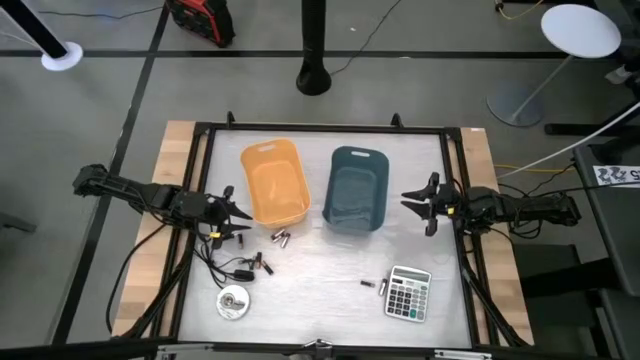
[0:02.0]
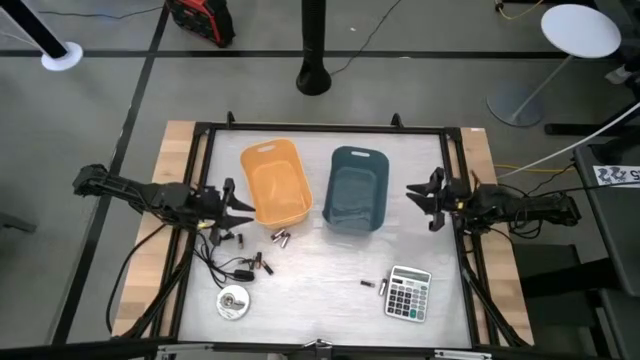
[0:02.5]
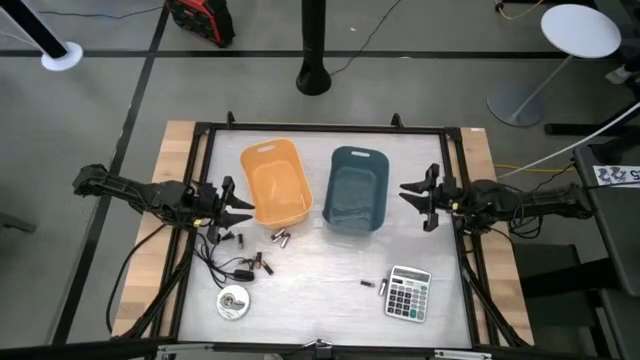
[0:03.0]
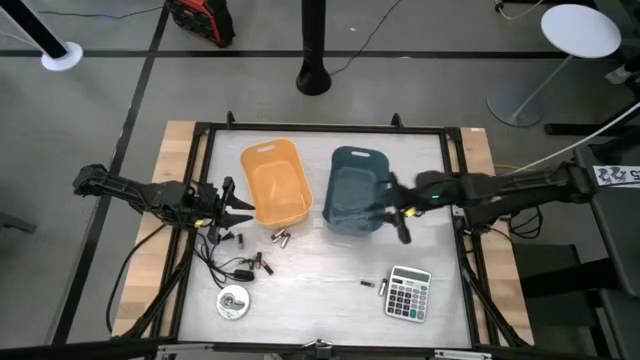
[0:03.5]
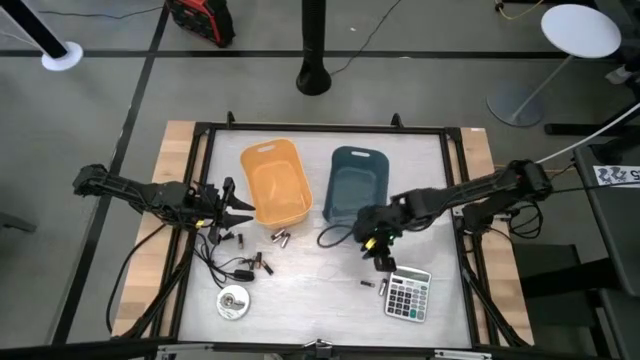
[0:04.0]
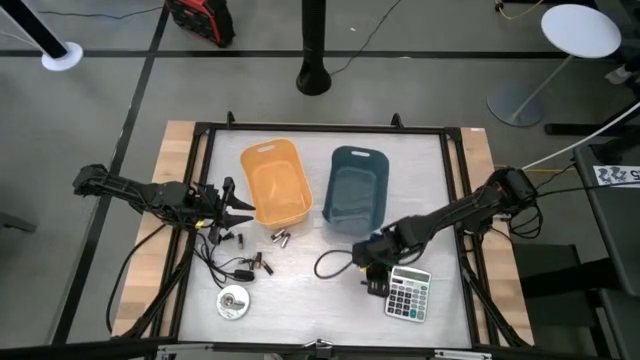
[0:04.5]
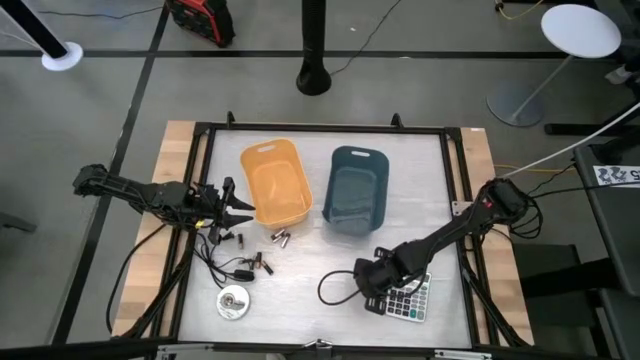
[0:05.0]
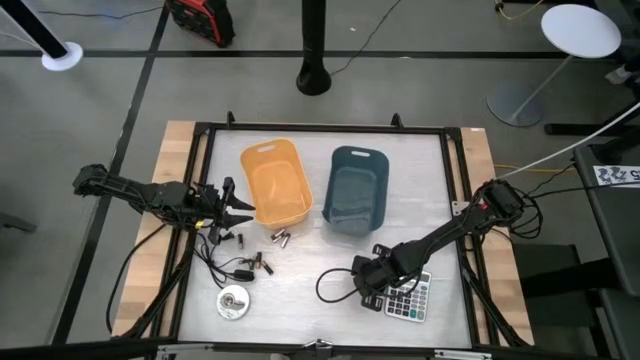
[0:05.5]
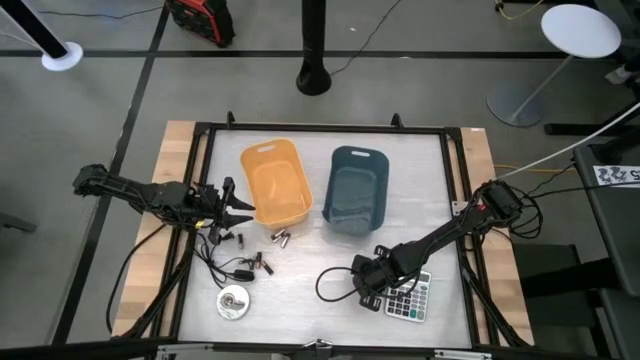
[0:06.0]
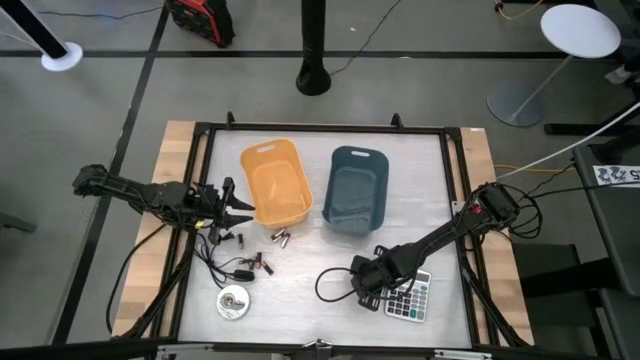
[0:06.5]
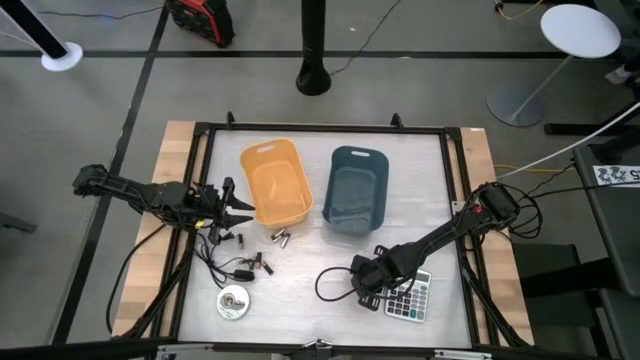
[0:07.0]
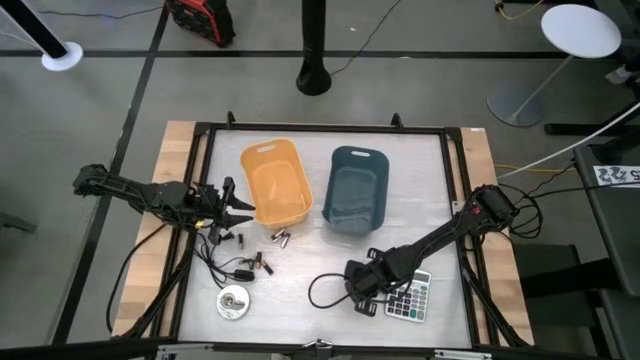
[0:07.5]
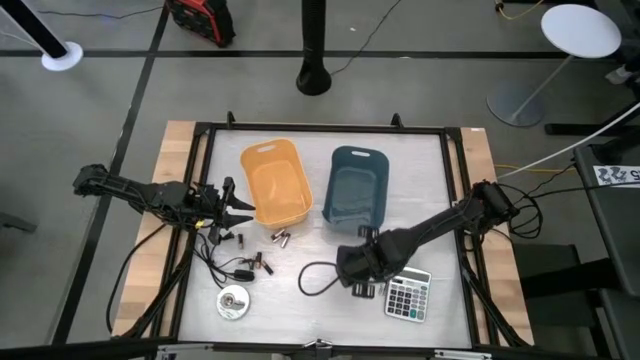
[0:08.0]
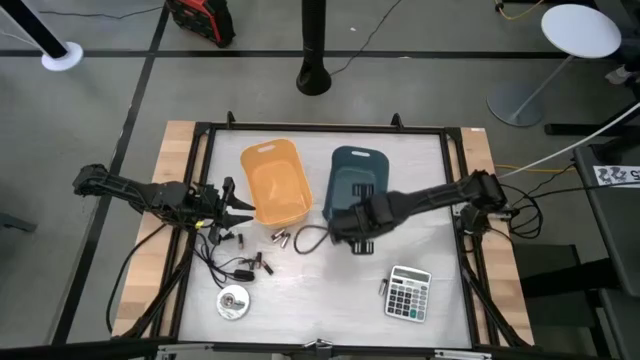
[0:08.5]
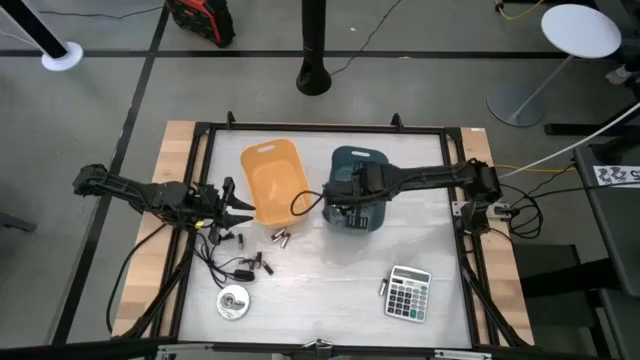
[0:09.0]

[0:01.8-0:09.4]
Task: Sort batteries
Put the black battery into the blue bin

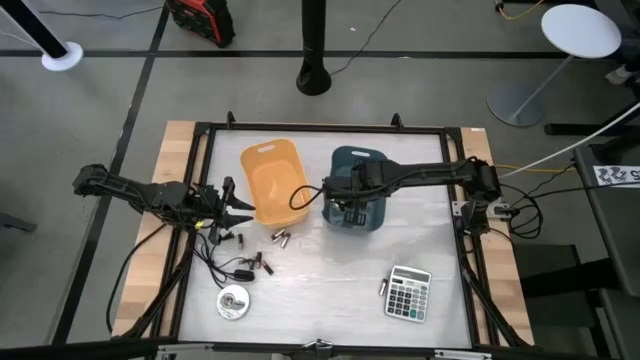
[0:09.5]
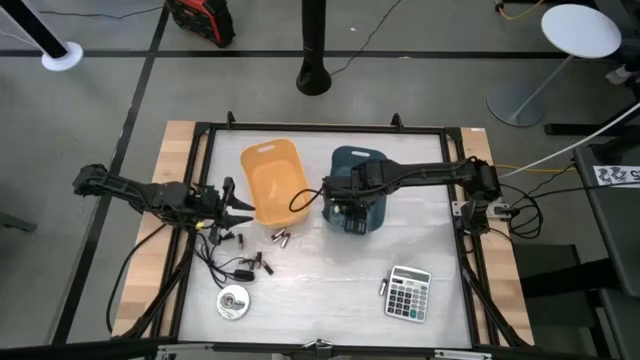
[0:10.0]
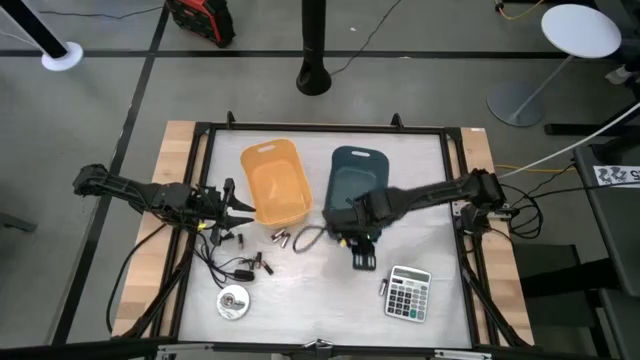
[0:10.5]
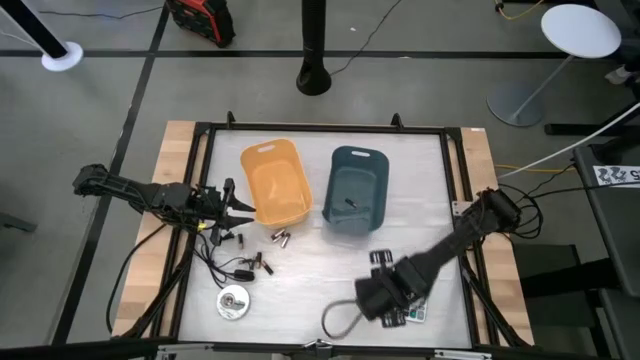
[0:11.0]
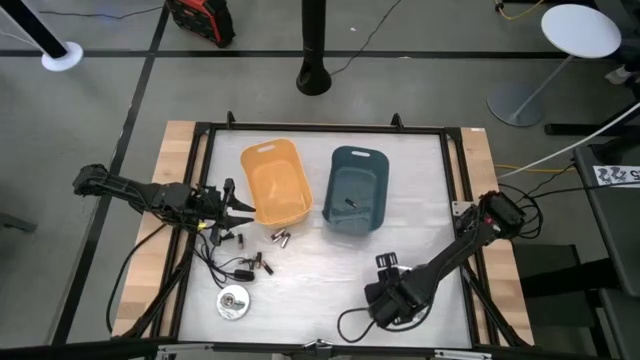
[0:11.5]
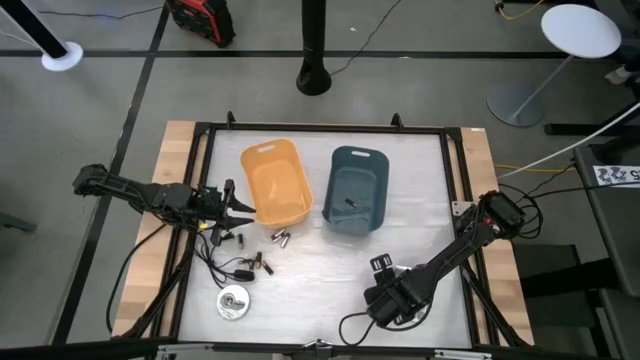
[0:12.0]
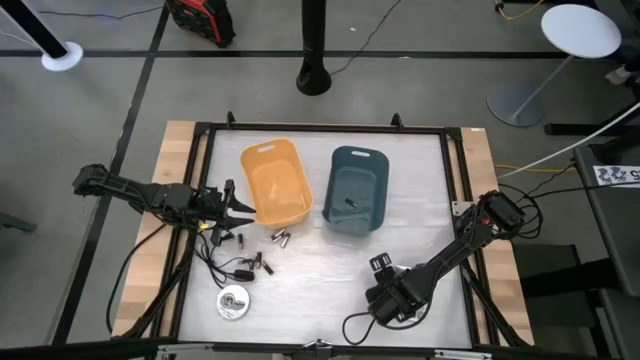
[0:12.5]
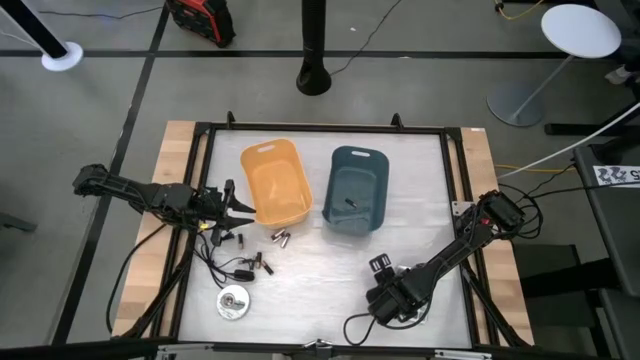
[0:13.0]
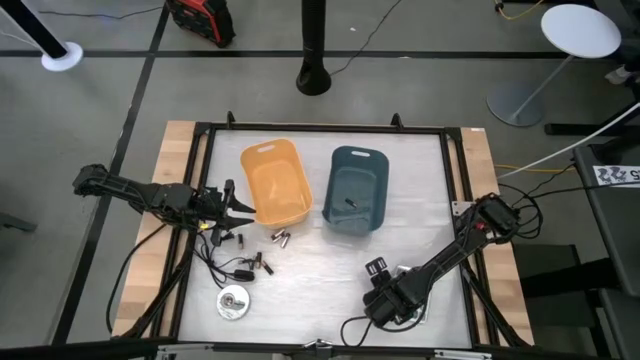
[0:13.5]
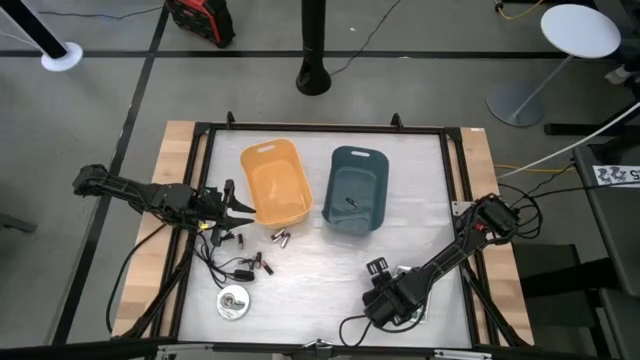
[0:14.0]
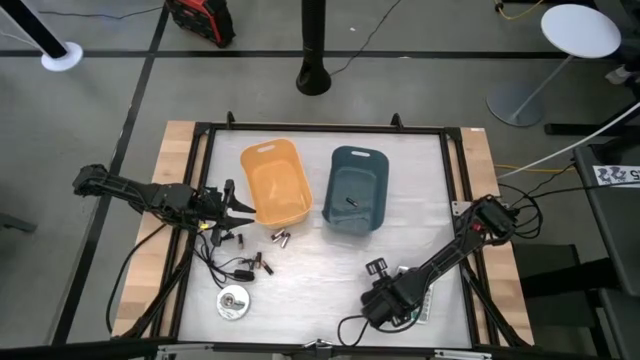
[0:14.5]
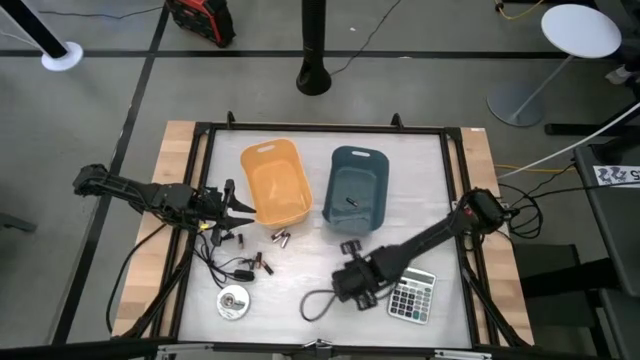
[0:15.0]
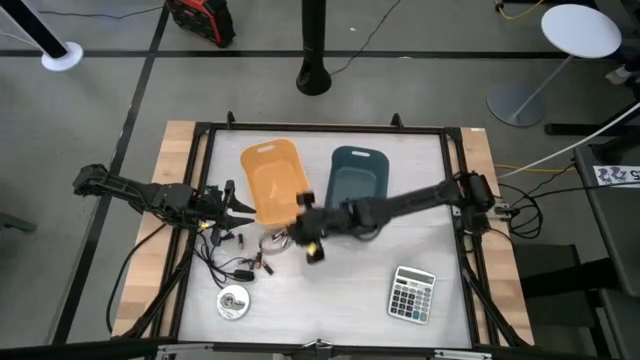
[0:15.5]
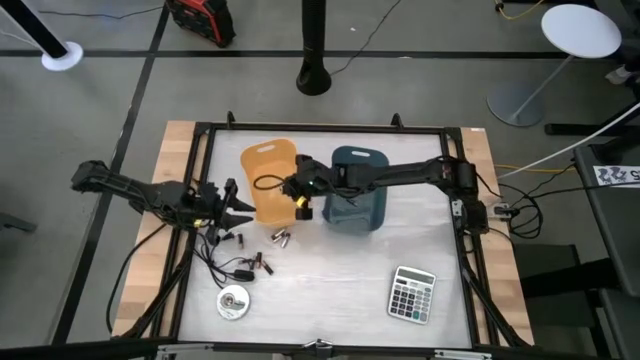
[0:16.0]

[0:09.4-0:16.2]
Put the silver battery into the yellow bin

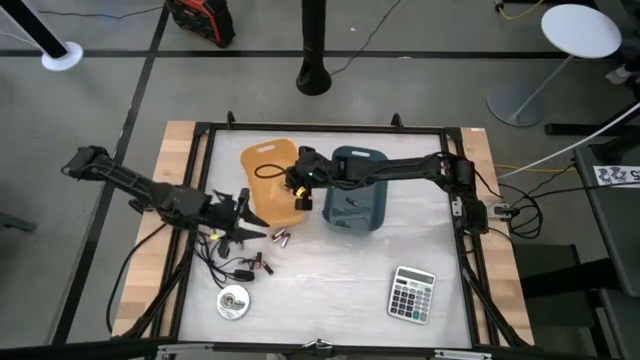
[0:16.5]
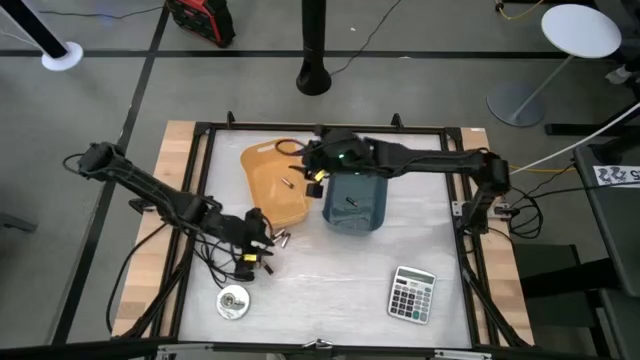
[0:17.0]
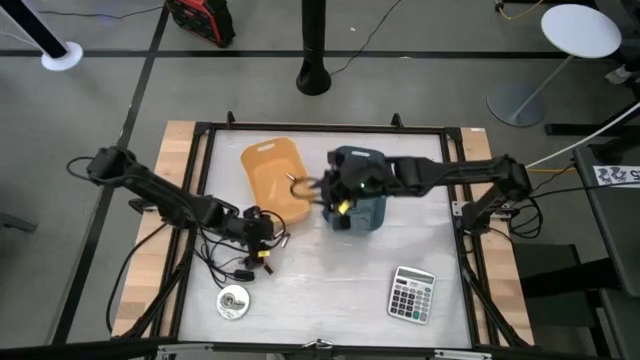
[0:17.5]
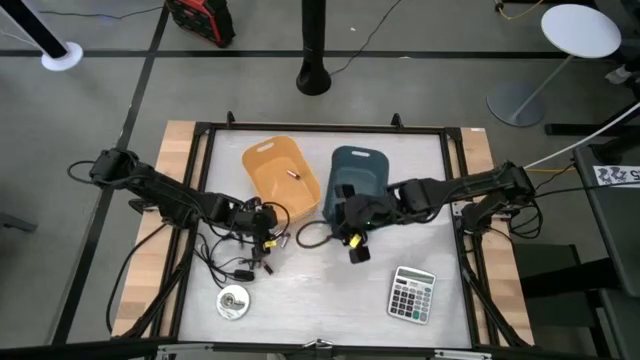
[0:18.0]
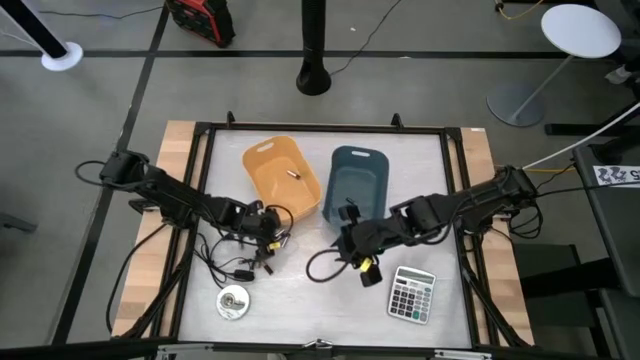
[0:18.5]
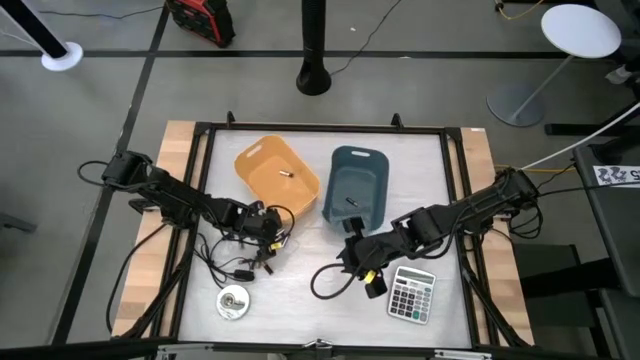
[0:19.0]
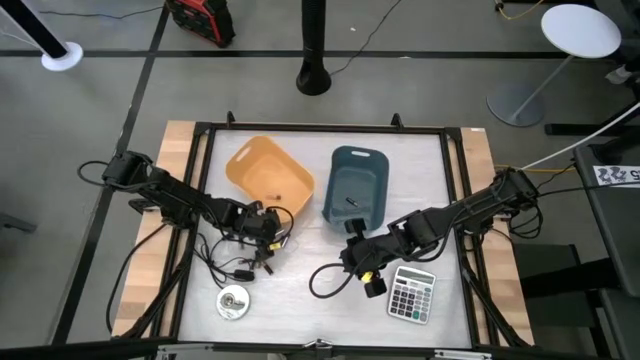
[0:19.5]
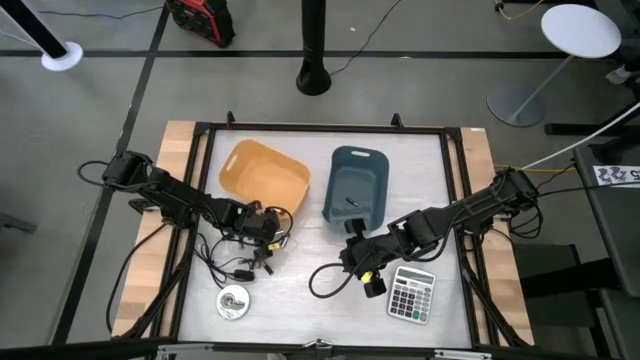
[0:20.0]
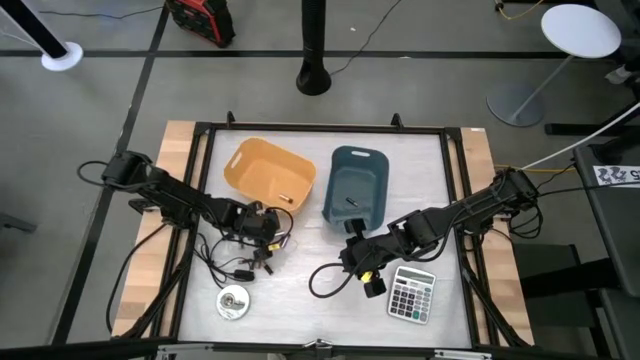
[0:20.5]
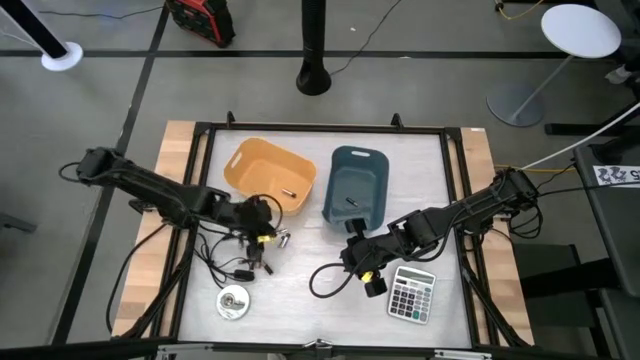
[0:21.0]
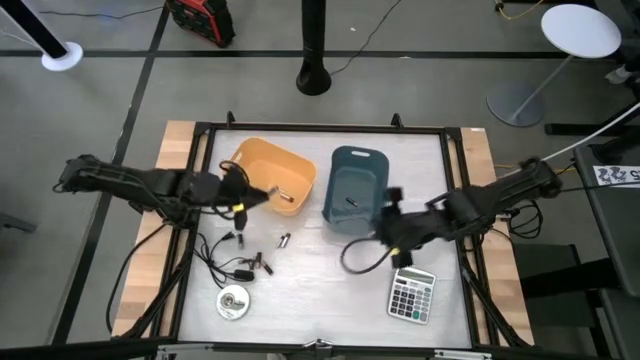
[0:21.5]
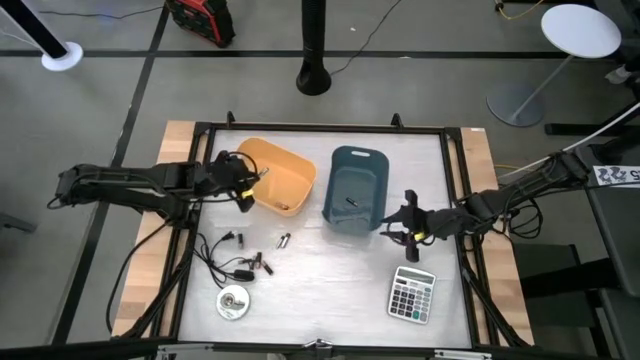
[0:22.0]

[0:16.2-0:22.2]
Put the silver battery into the yellow bin

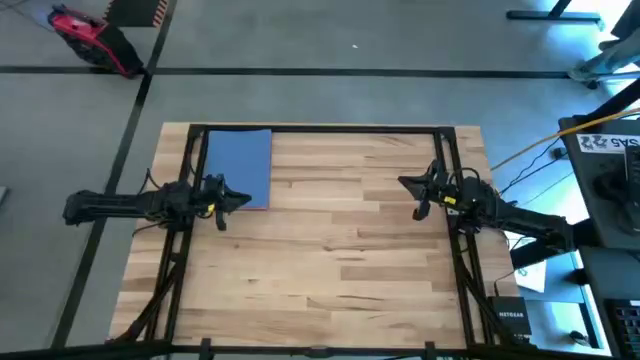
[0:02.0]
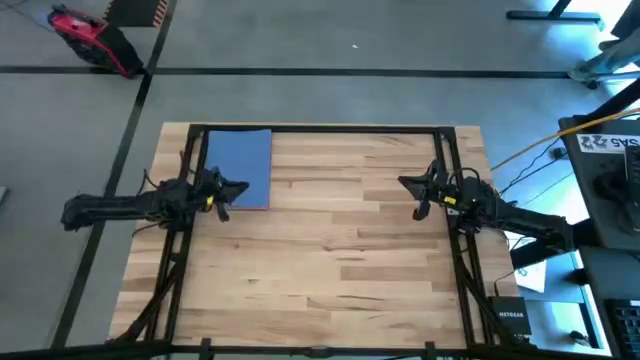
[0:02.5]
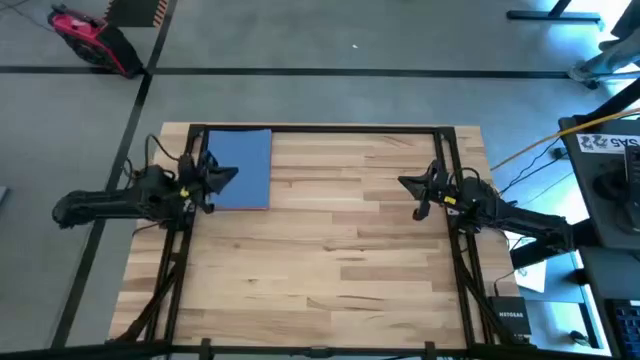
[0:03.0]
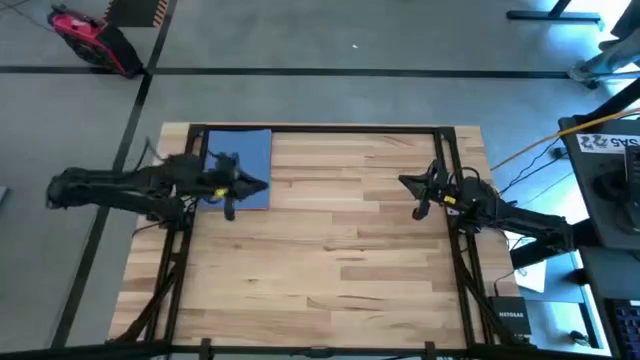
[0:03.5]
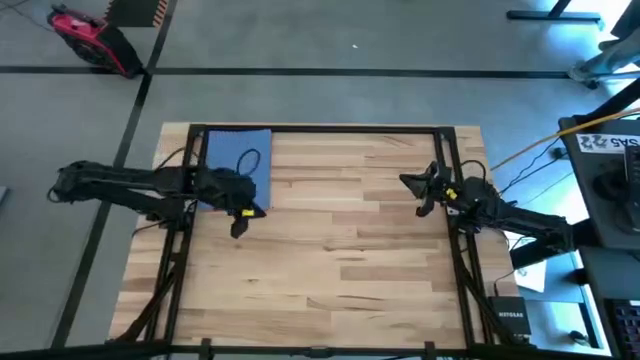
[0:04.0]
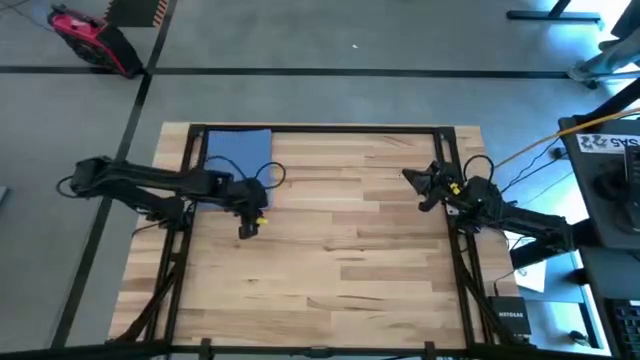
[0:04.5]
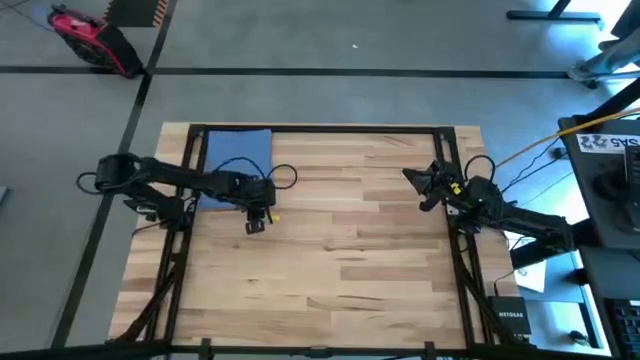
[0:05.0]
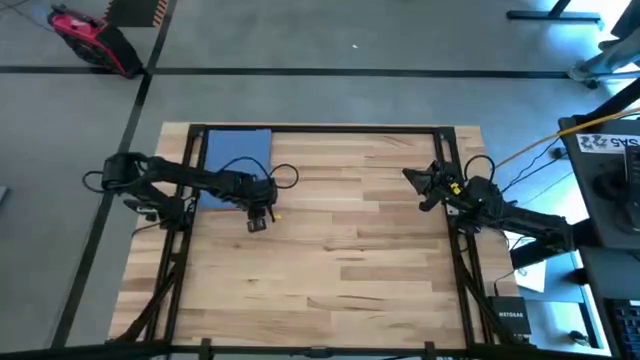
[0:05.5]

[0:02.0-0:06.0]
Task: Organize paper
Move the blue colored paper on the bottom left of the table
